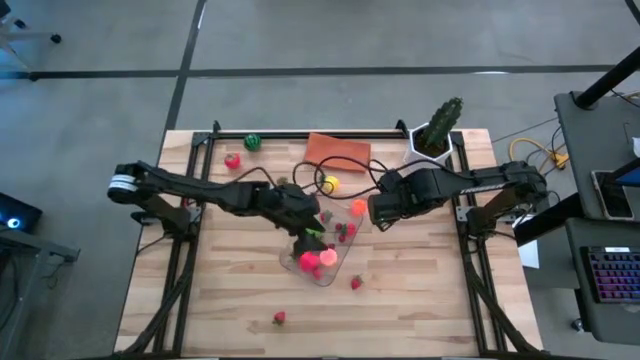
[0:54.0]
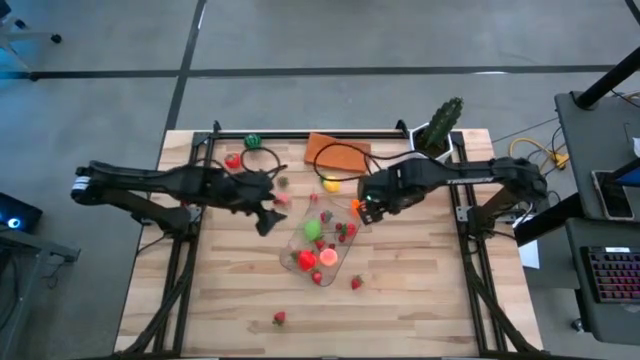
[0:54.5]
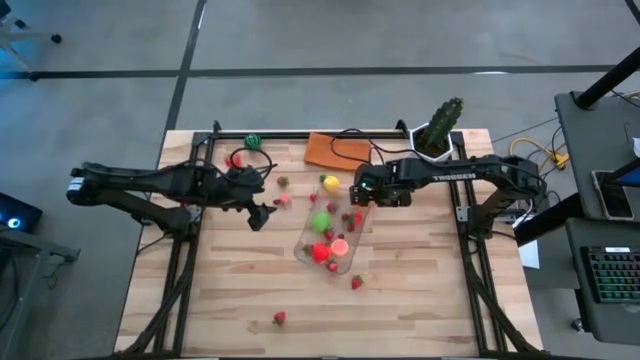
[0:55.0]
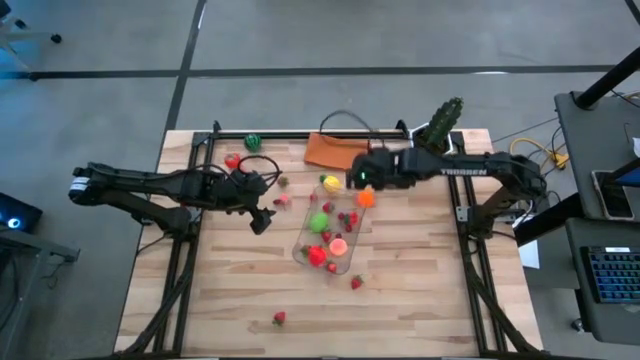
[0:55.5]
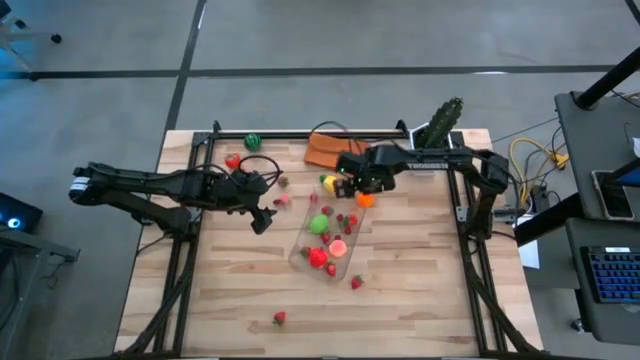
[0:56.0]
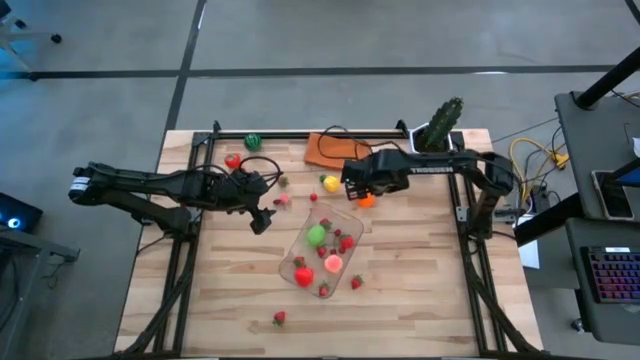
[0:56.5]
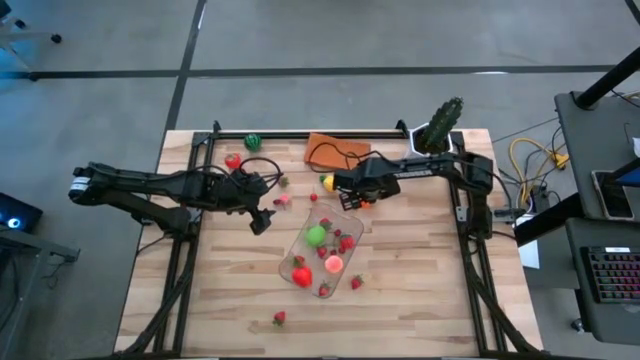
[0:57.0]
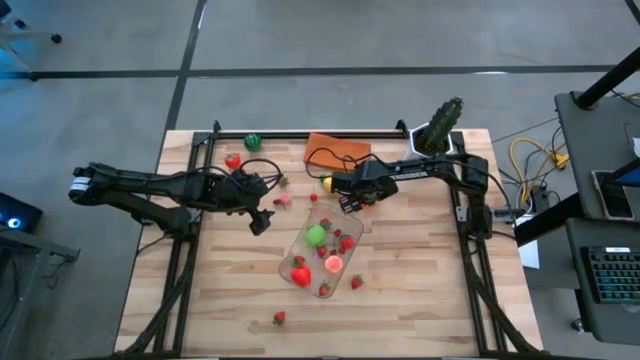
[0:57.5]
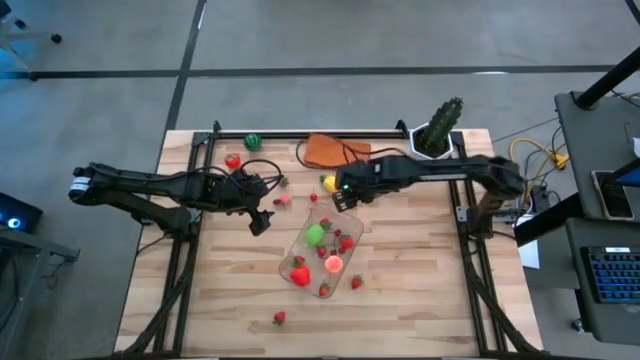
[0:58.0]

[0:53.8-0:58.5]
Task: Pick and placing Produce into tupperware
Put the pumpkin toy into the transparent bin

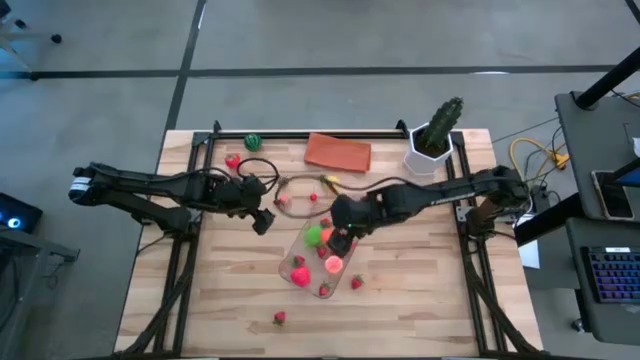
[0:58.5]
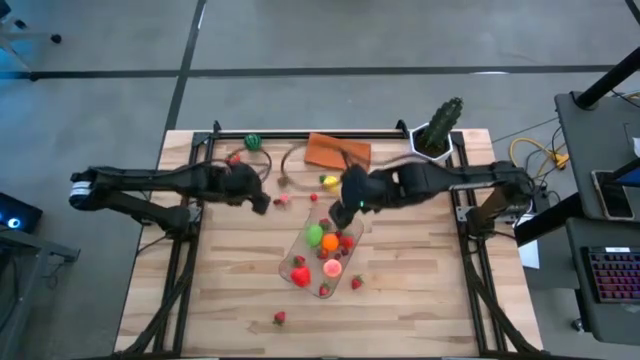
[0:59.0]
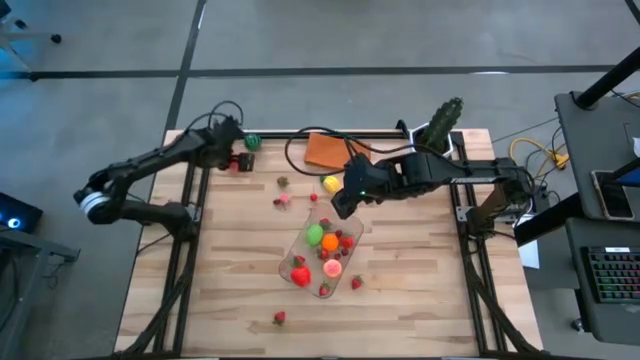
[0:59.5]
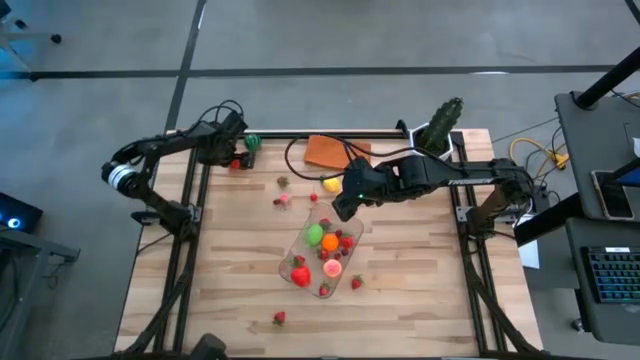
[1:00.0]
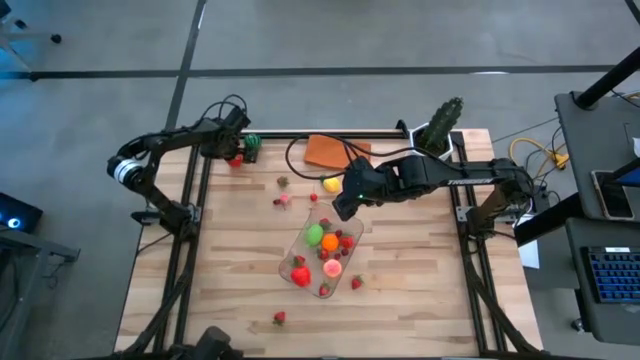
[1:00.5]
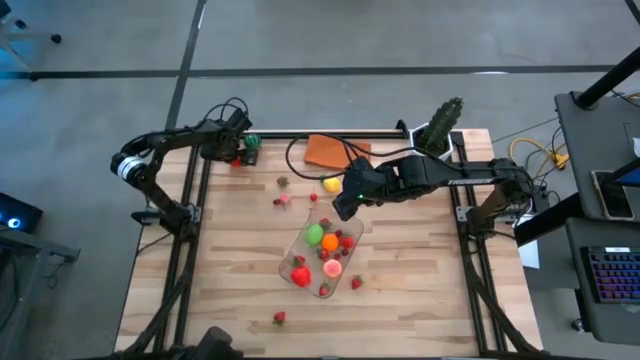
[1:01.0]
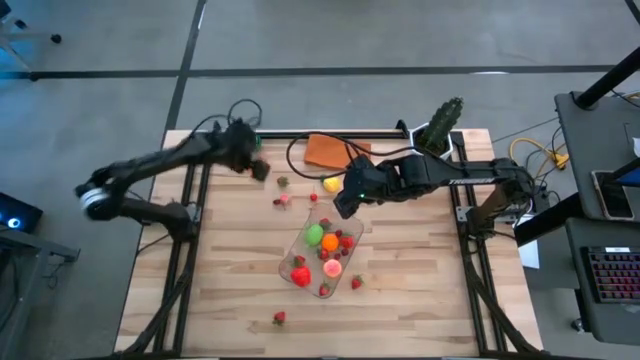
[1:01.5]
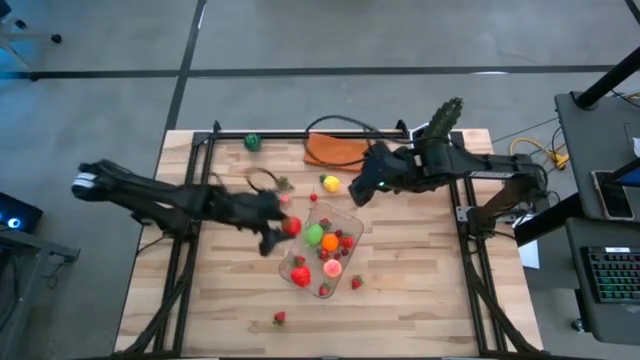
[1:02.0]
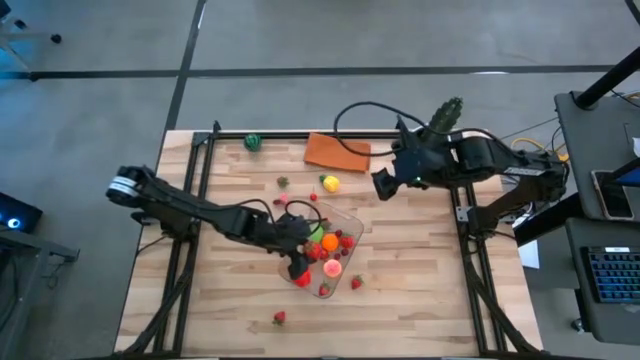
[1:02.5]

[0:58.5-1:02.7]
Put the tomato into the transparent bin

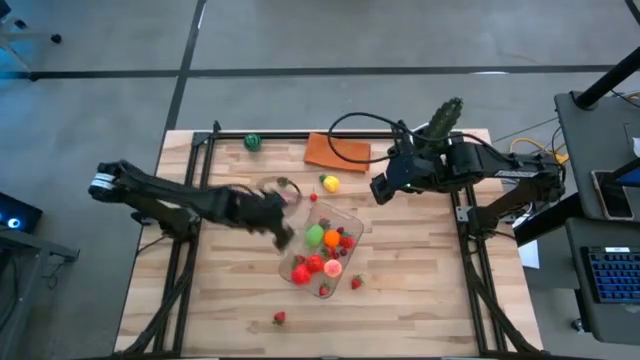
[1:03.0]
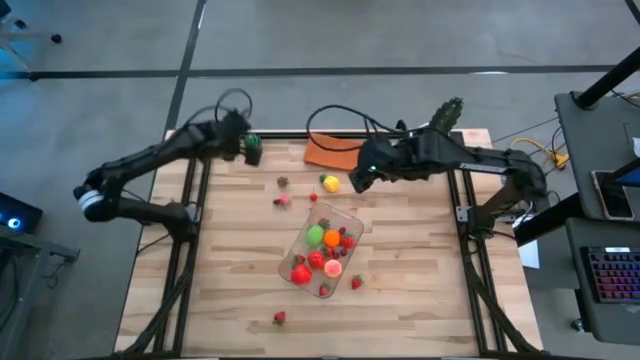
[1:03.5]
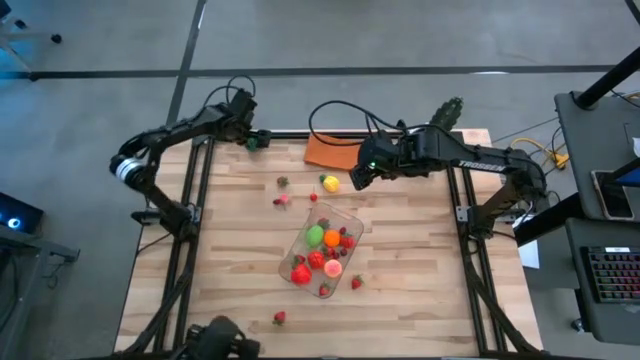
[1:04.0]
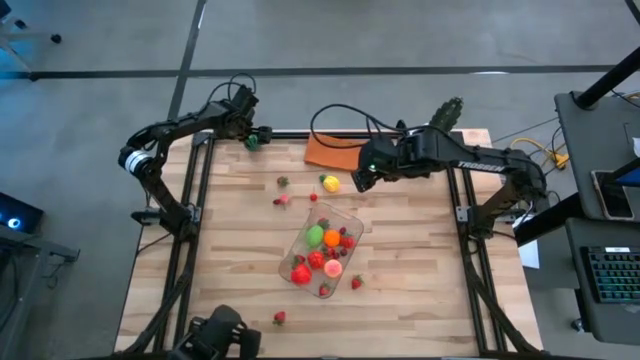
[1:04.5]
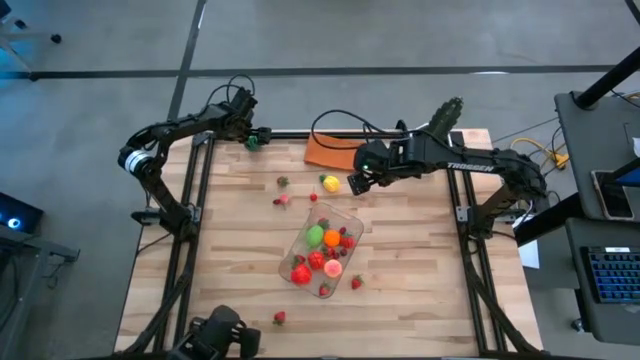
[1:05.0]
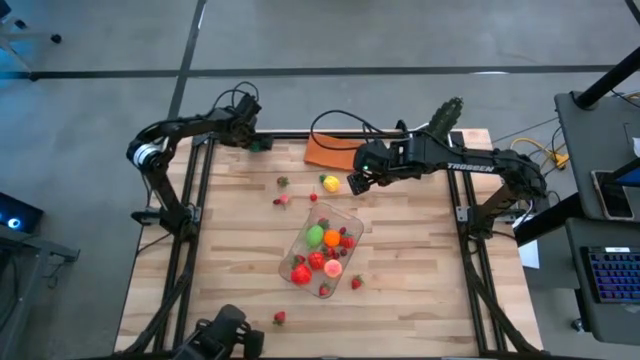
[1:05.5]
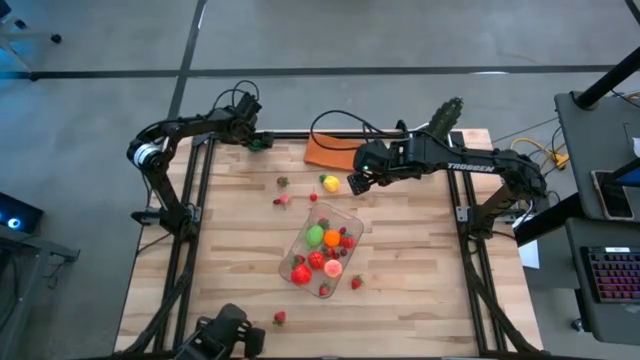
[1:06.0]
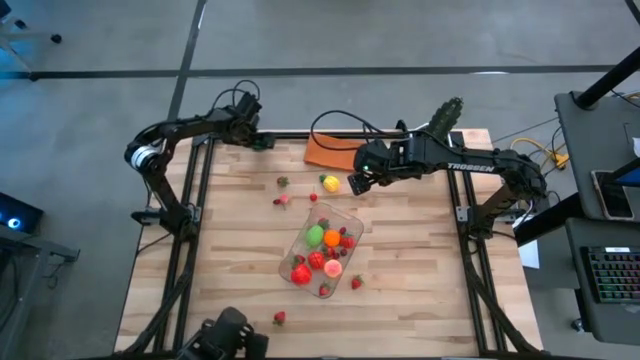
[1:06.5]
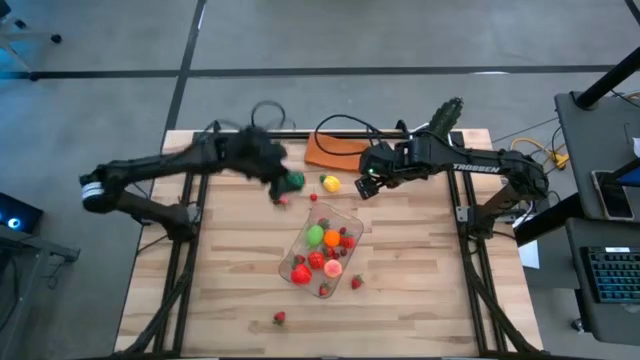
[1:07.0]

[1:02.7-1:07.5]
Put the watermelon into the transparent bin

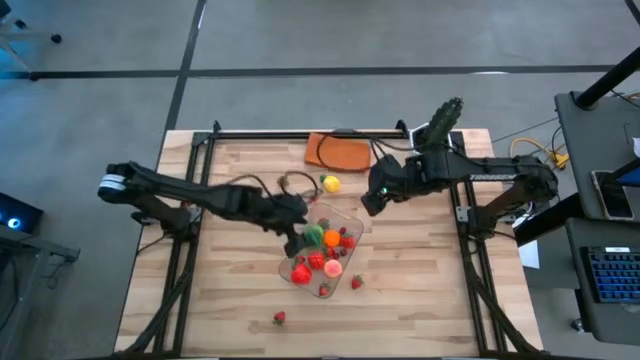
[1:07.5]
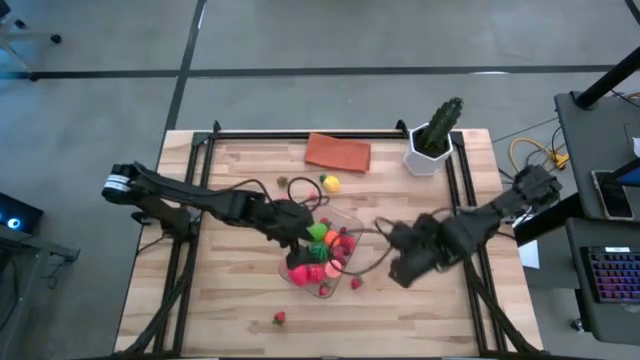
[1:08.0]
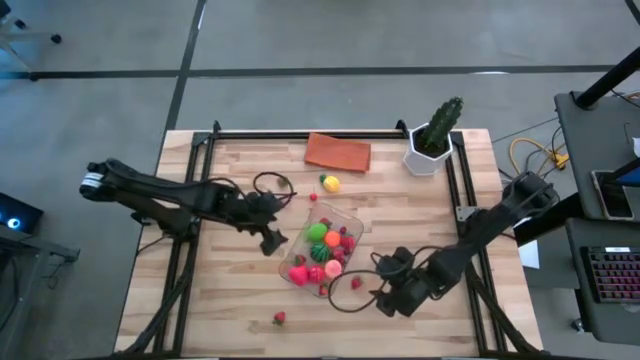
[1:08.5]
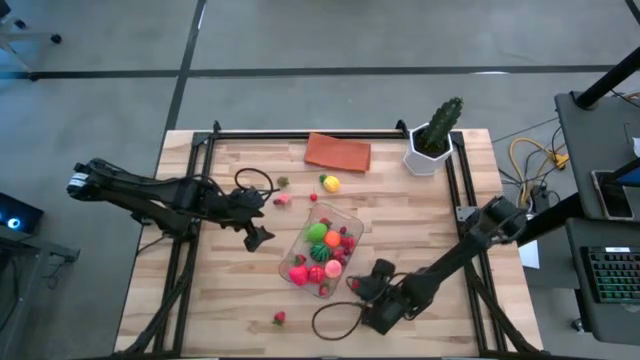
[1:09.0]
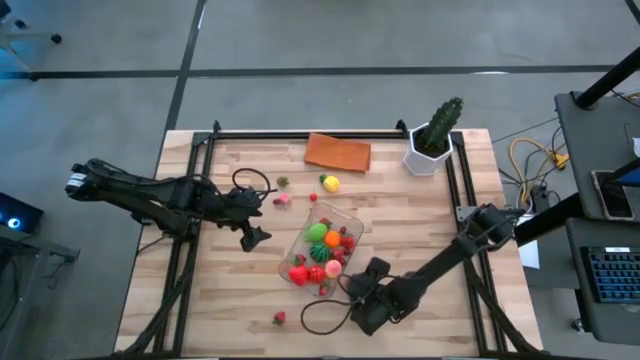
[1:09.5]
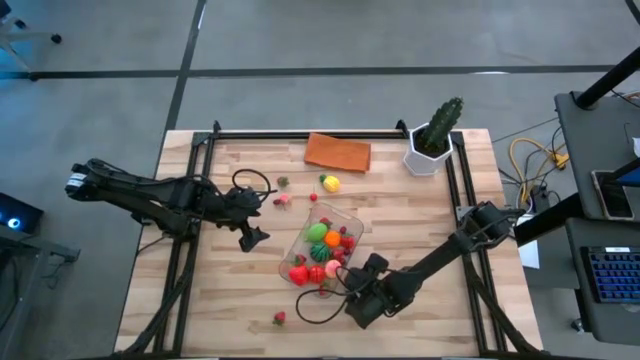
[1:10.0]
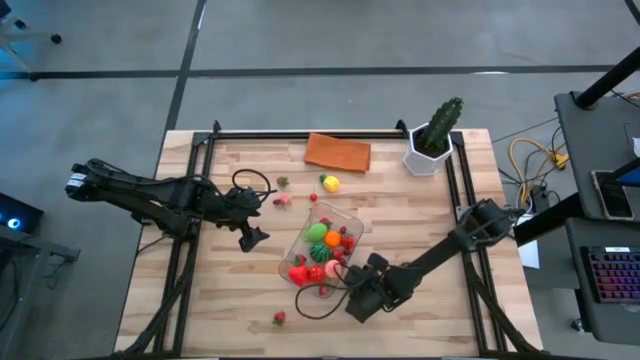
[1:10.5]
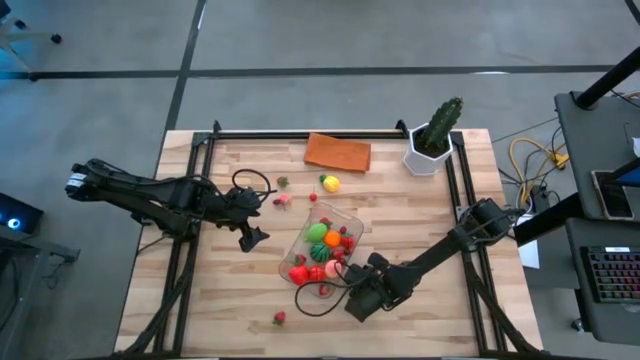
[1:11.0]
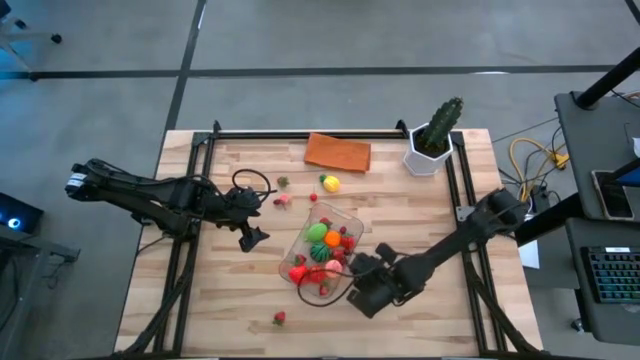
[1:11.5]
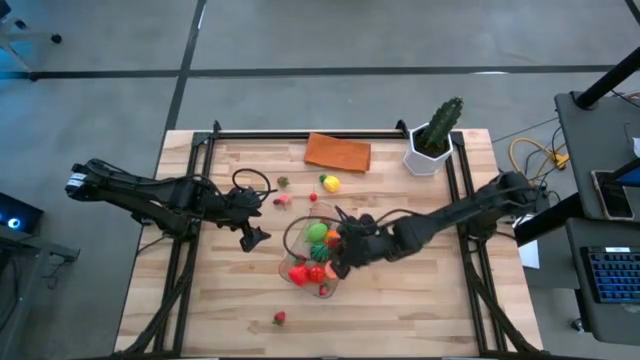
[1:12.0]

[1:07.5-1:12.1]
Put the right strawberry into the transparent bin

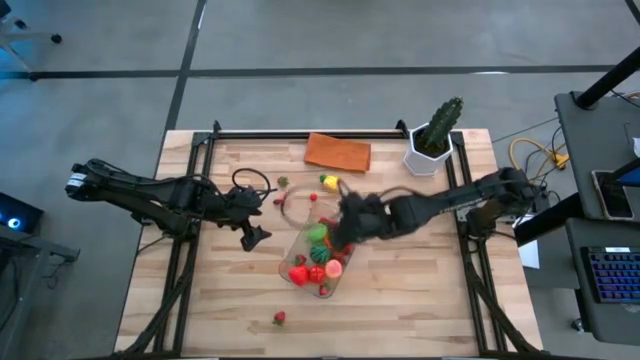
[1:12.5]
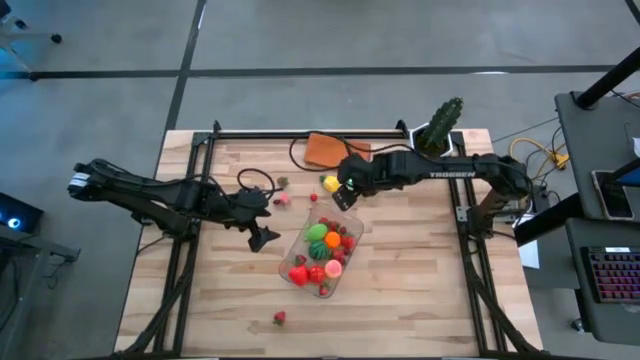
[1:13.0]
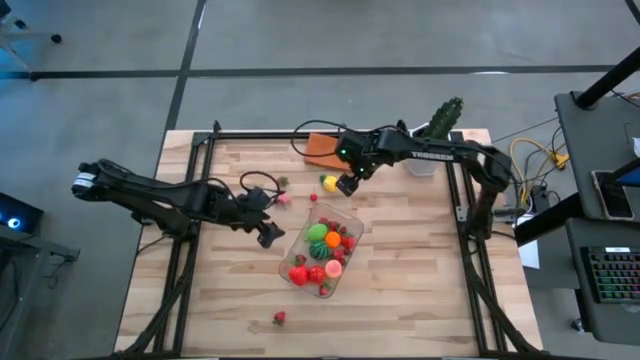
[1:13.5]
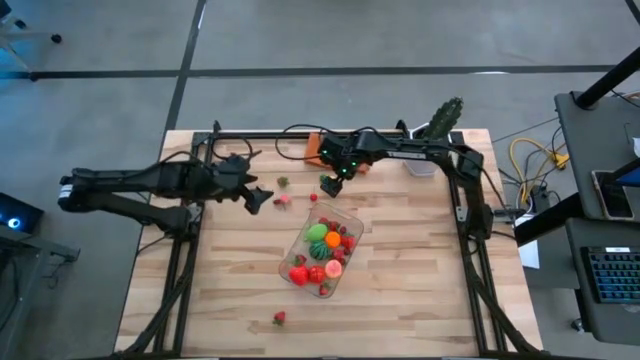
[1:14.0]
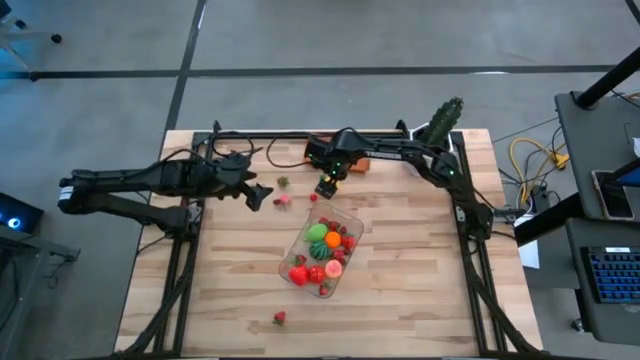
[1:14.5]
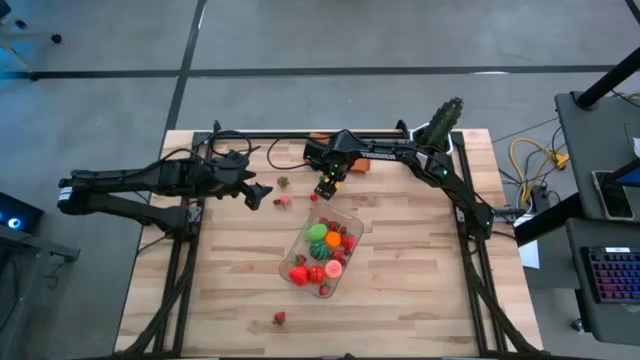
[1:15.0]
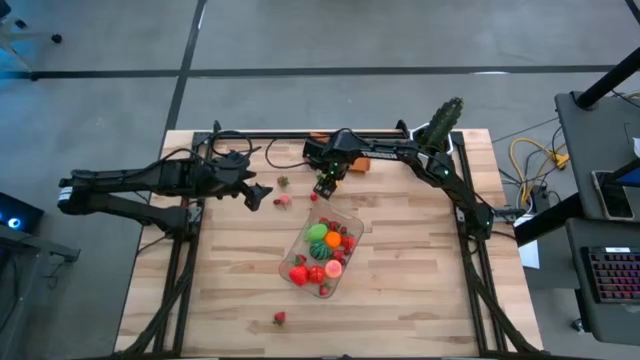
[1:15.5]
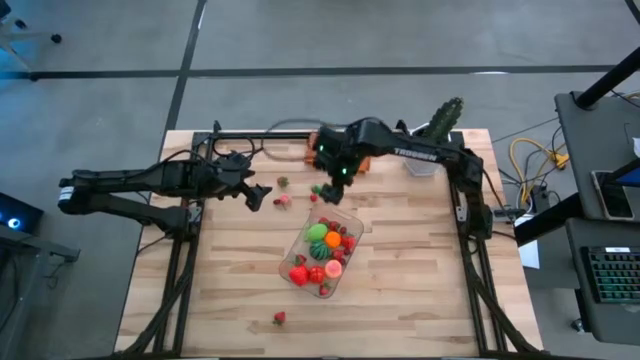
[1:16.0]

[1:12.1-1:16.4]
Put the pineapple into the transparent bin
